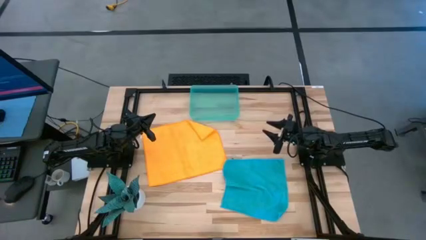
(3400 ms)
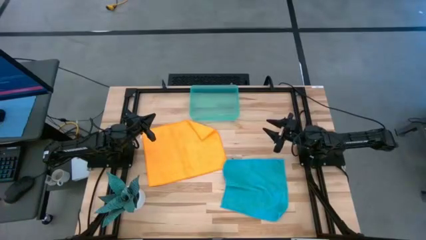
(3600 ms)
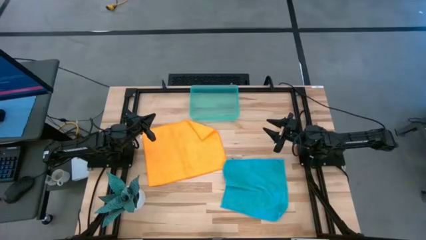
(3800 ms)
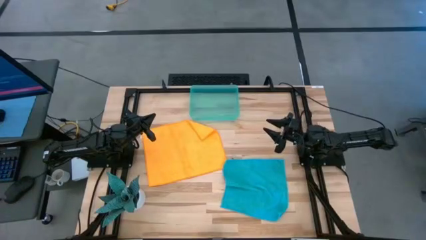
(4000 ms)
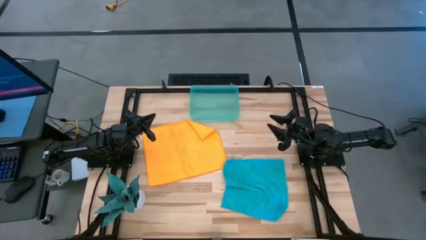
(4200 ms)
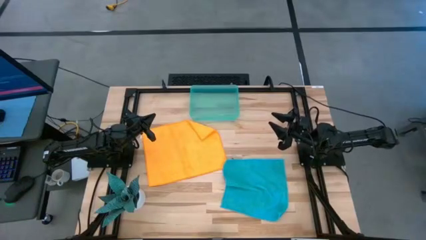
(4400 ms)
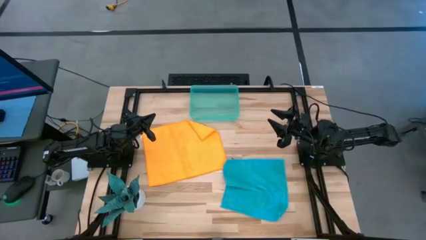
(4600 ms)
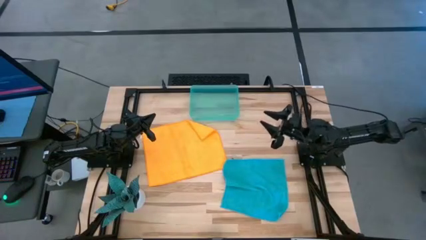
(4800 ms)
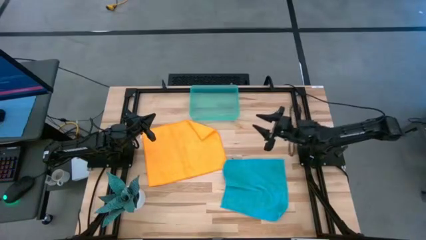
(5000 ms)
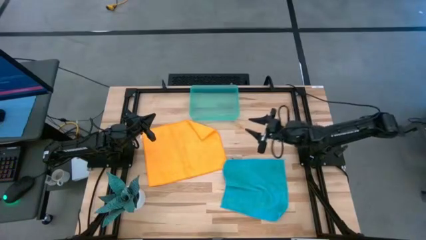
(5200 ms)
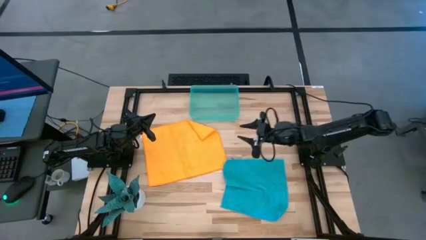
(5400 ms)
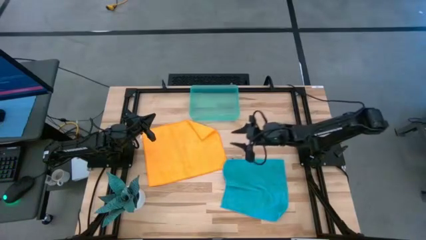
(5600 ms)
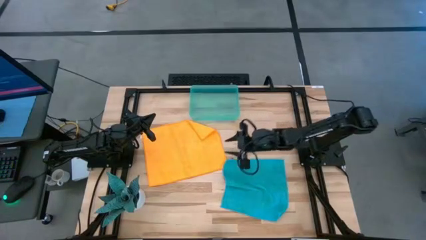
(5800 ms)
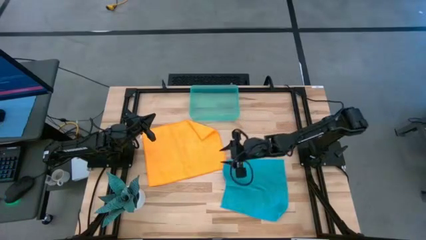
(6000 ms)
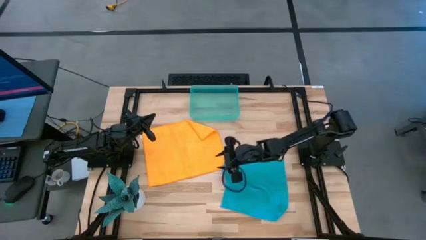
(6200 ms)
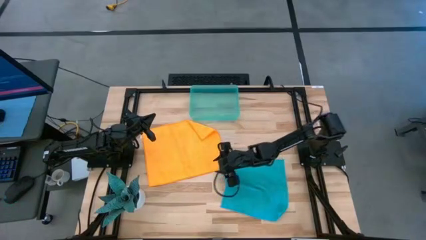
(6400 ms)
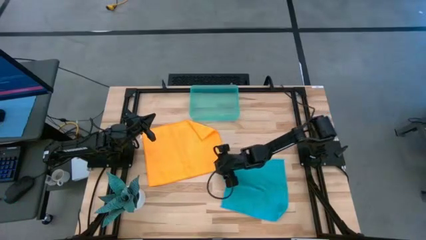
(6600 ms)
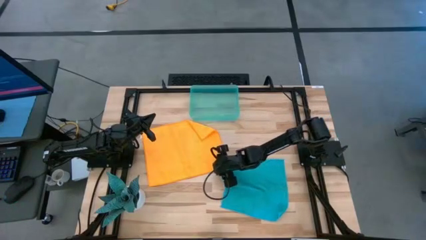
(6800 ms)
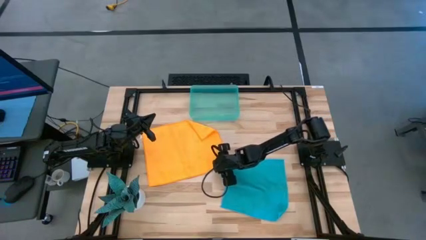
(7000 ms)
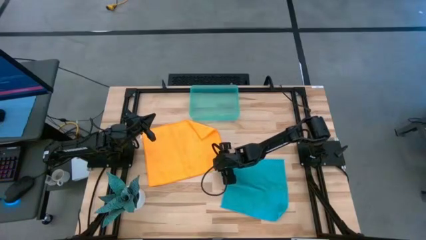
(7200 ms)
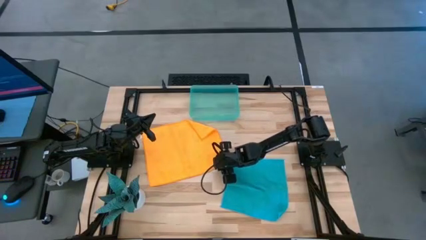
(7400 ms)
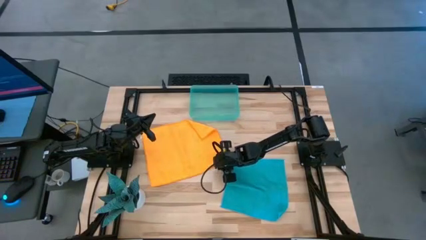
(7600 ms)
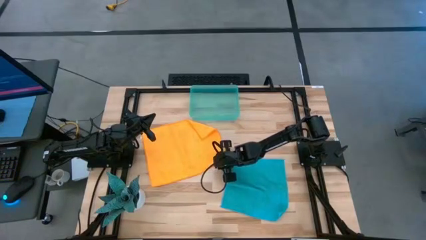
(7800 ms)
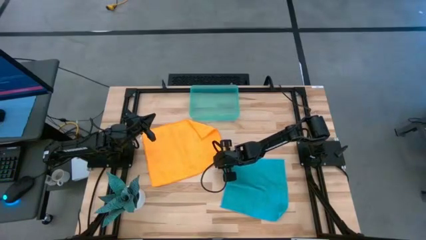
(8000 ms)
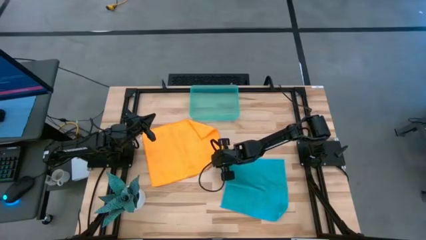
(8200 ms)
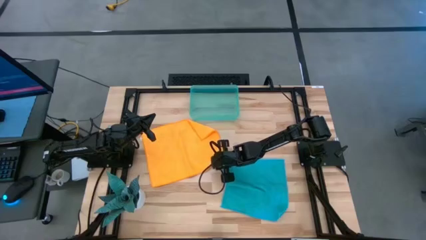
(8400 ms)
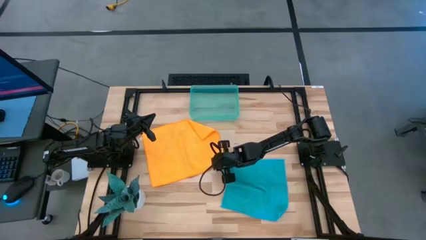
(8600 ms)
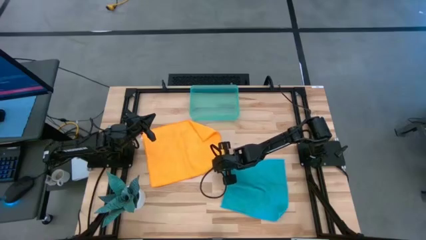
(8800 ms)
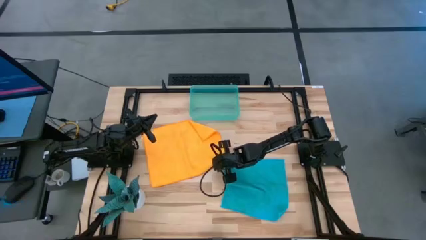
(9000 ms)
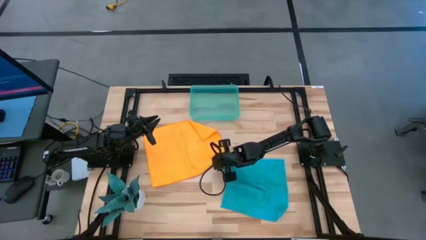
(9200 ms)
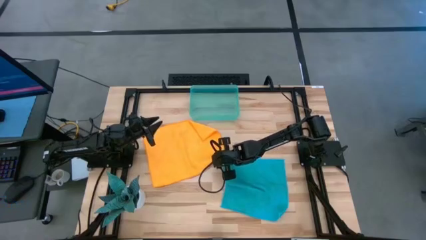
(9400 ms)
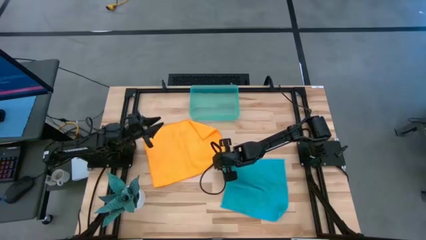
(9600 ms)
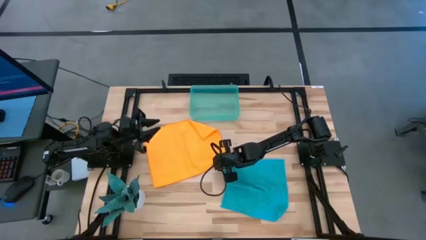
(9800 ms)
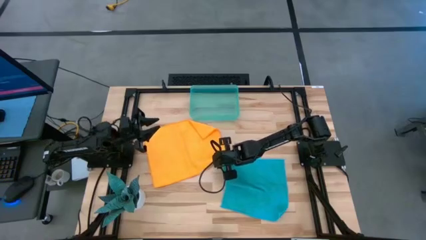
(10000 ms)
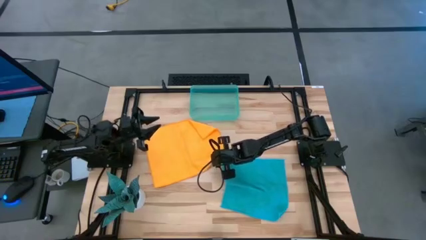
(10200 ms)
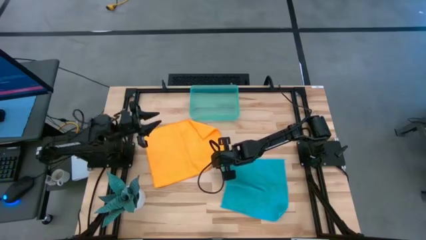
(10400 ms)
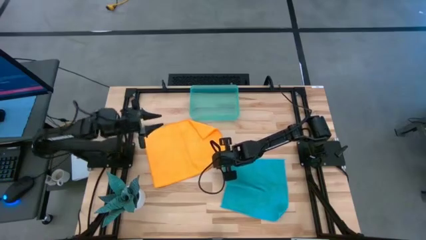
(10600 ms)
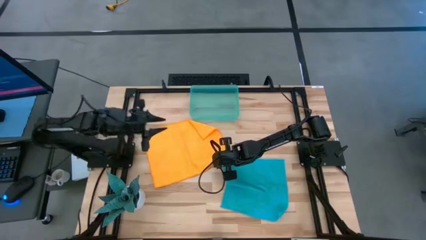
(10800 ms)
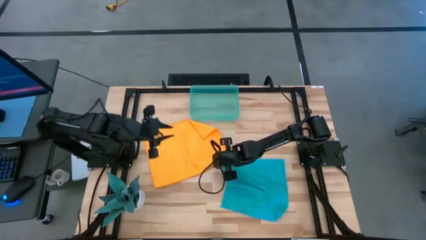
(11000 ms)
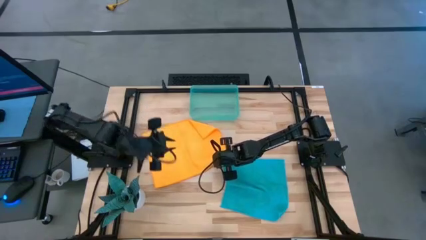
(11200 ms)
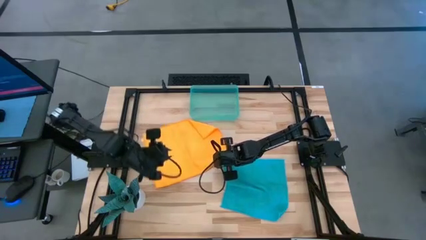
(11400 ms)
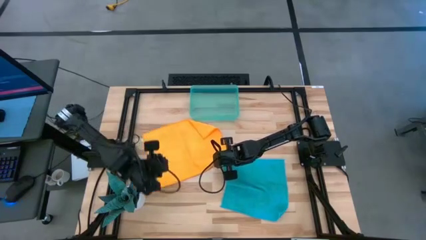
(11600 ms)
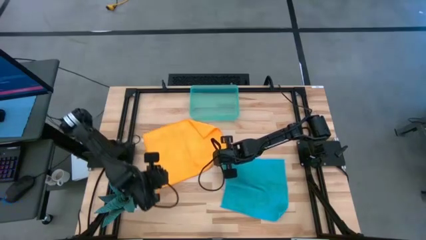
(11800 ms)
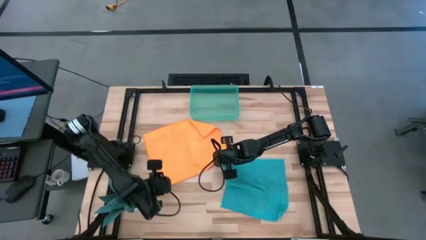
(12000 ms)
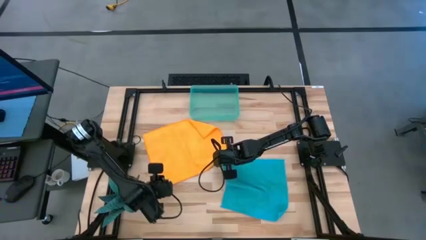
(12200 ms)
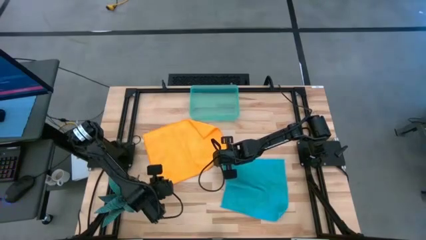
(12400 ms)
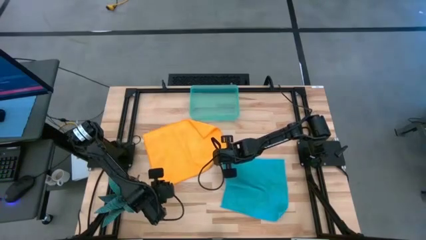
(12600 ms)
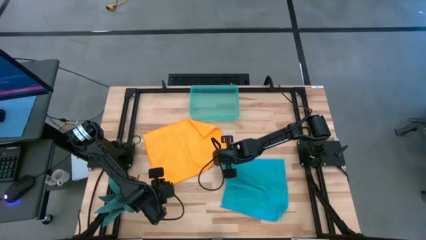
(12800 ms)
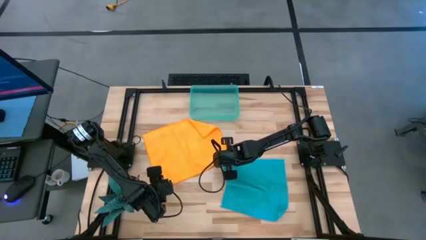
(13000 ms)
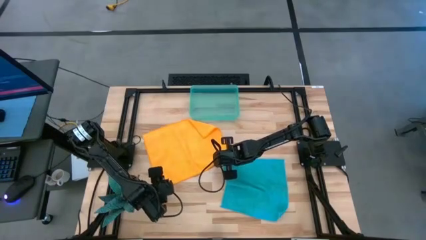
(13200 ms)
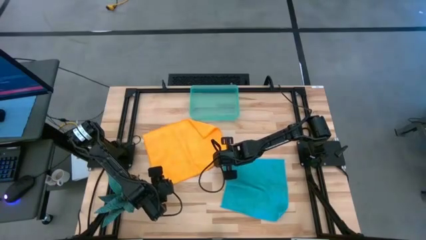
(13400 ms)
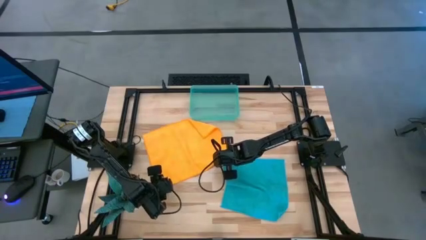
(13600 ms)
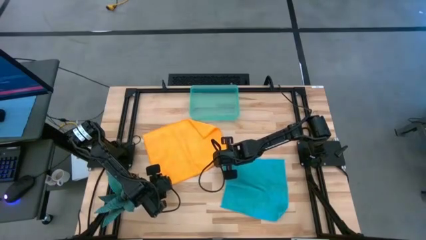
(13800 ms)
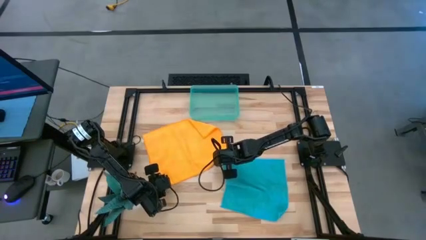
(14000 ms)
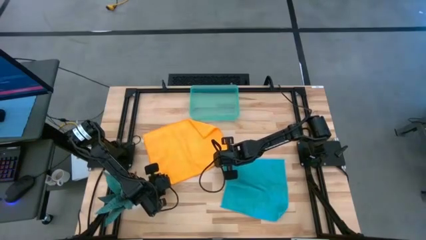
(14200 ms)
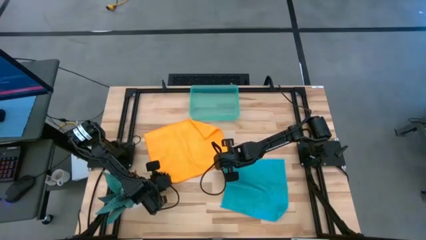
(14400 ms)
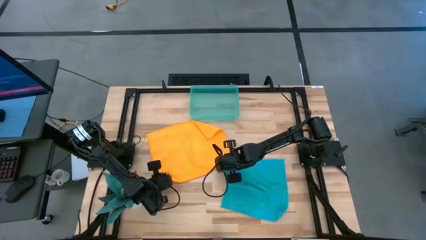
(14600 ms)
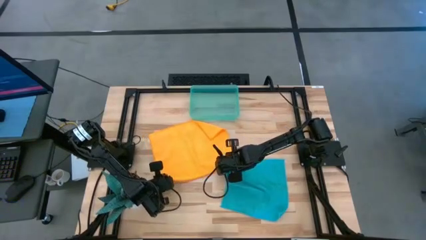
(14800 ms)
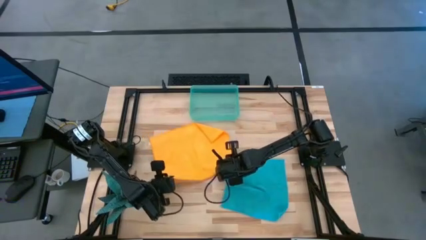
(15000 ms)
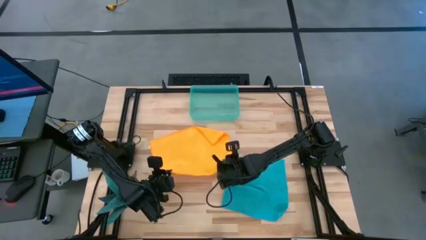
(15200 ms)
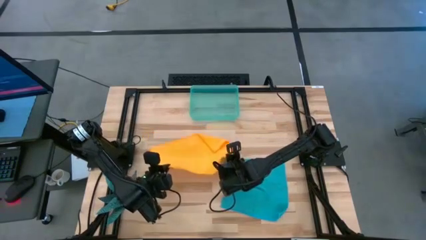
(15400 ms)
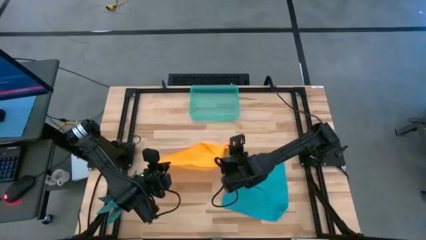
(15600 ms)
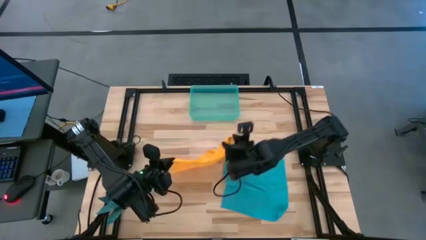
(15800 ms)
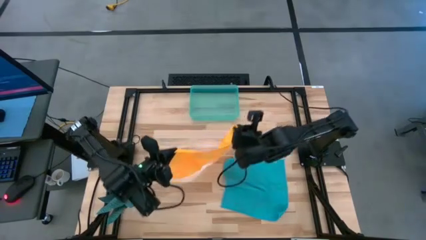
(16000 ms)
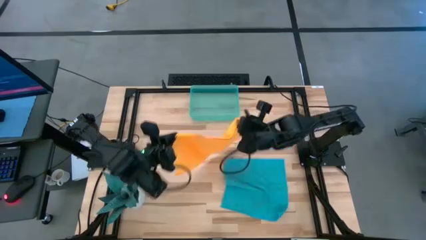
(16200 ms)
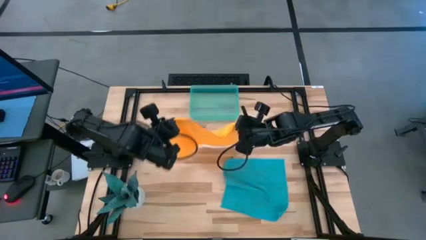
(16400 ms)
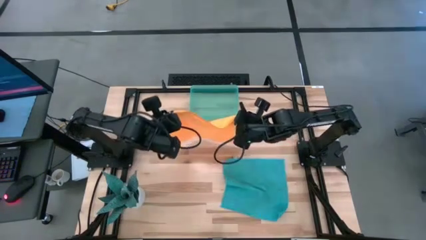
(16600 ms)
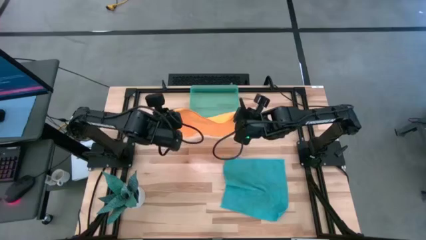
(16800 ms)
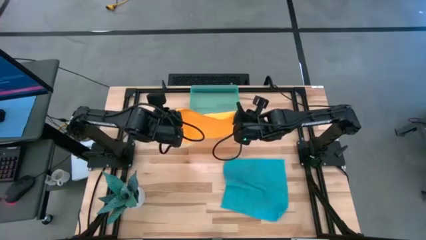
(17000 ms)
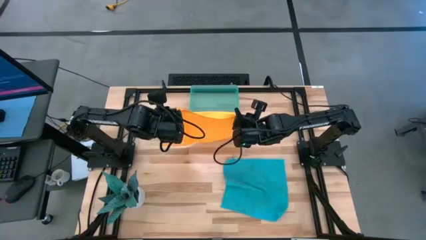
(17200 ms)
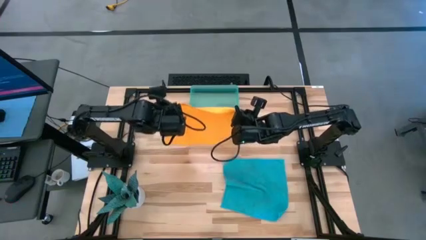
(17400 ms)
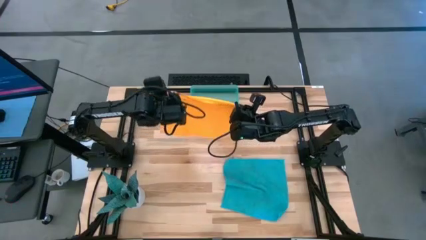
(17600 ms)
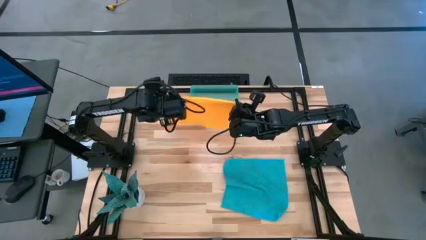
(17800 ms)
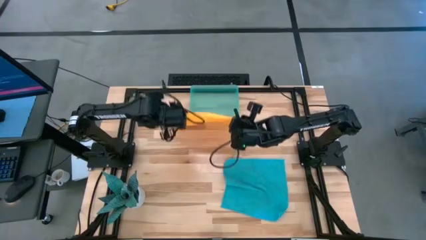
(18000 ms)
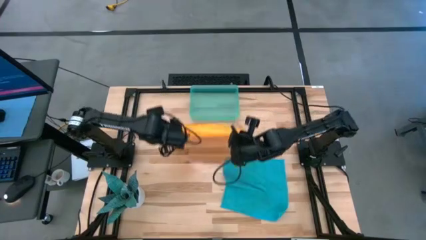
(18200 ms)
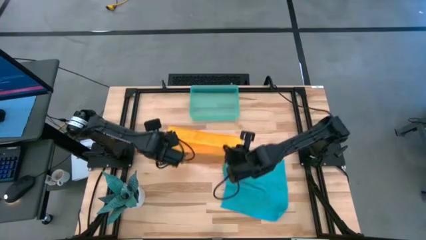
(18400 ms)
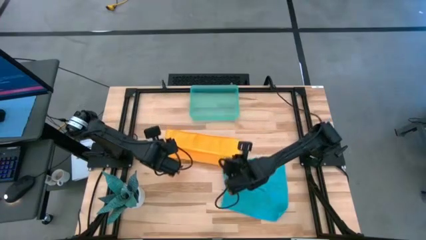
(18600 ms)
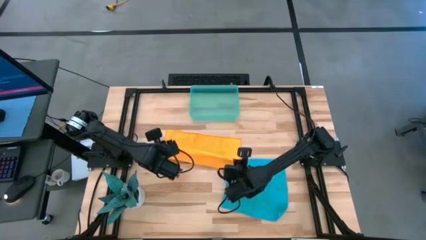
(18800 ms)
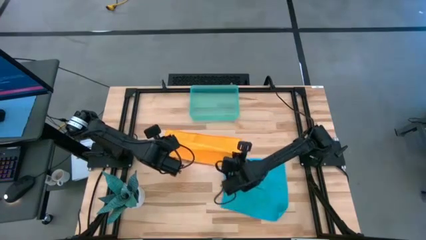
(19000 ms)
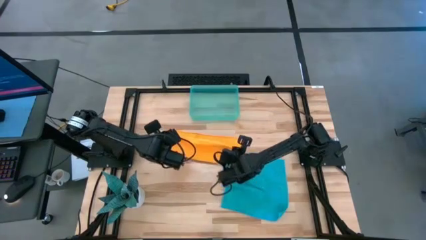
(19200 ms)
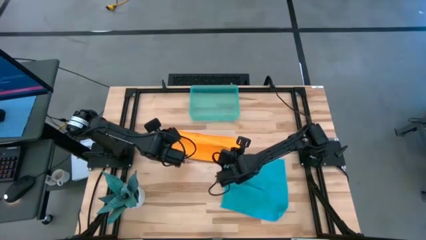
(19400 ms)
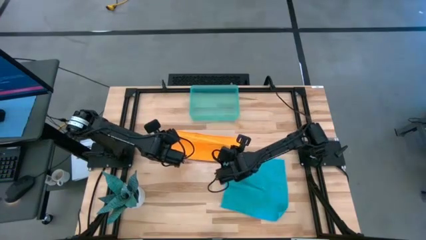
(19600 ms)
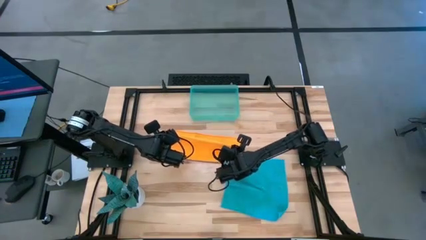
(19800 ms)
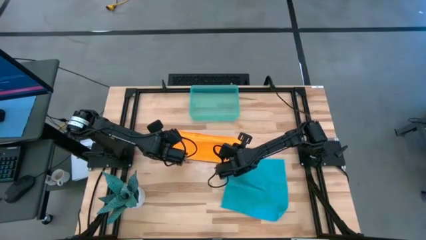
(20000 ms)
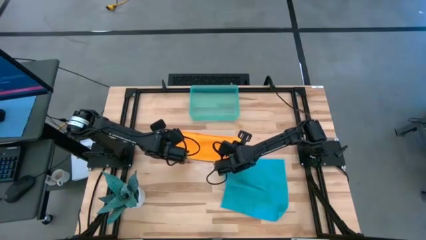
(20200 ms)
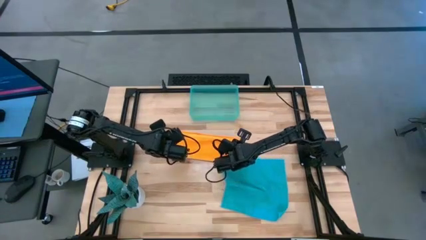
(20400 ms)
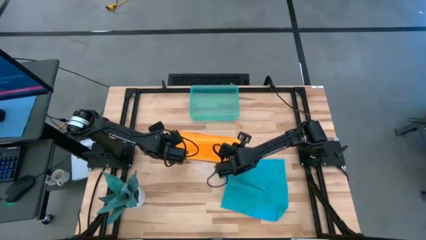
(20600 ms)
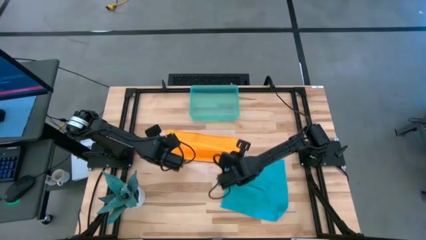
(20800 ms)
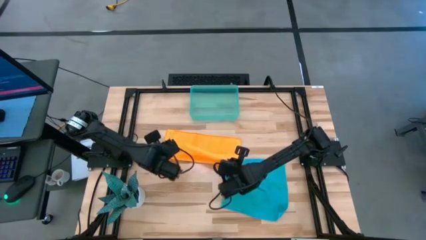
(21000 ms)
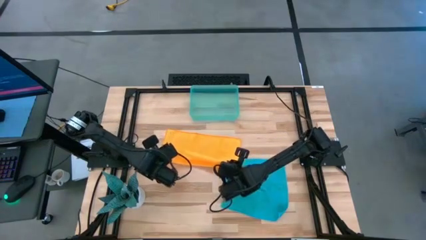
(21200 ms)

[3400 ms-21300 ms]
Task: Roll microfiber towels into tight, uniform cylinder then place into a basket
Roll the yellow microfiber cloth on the table
